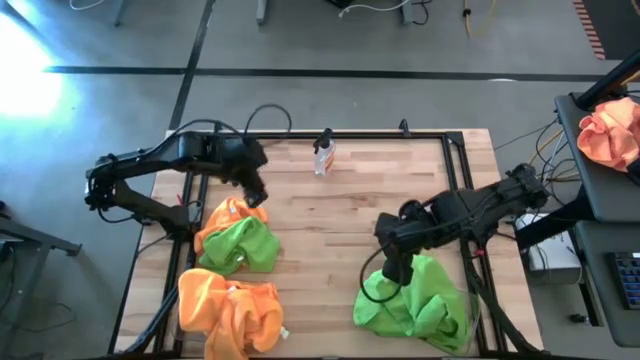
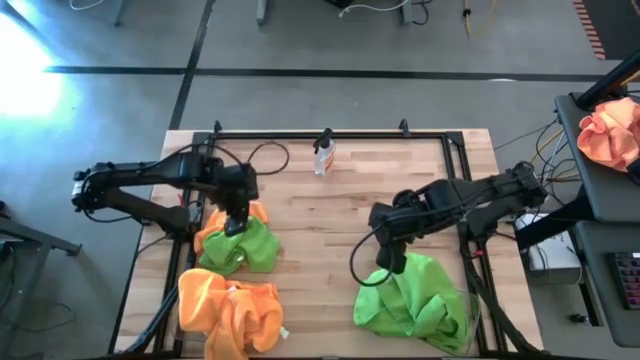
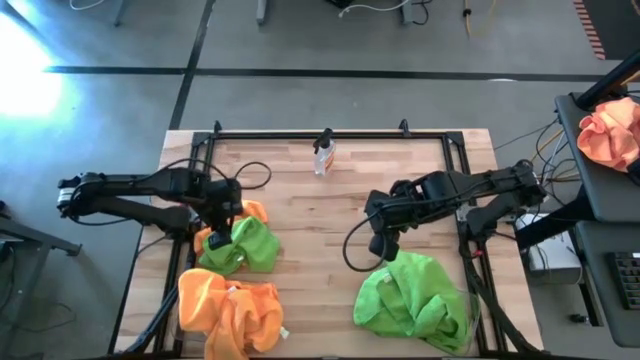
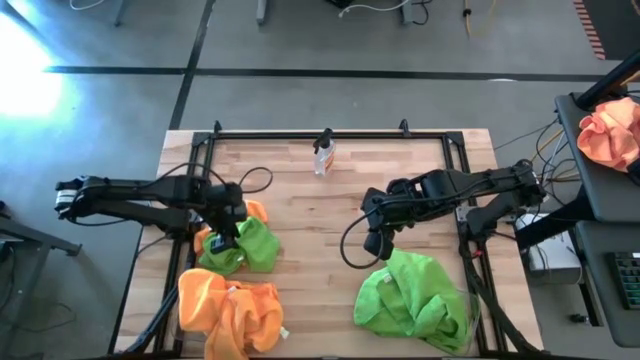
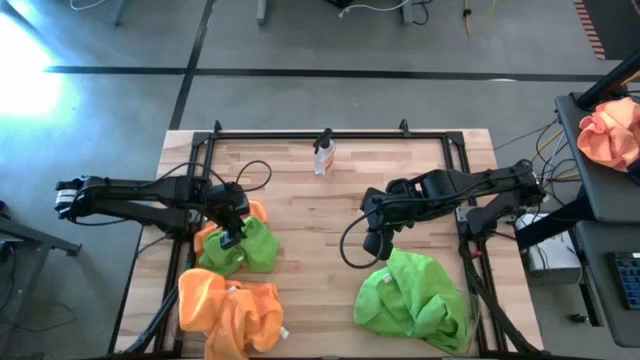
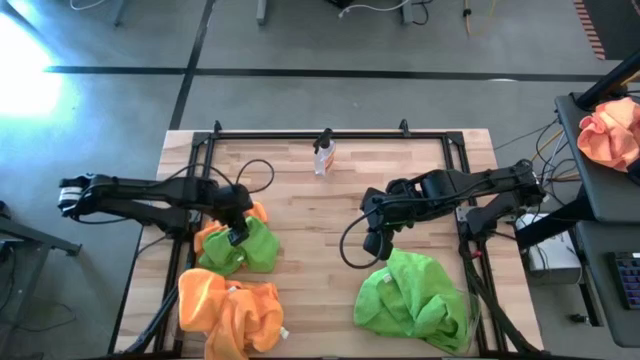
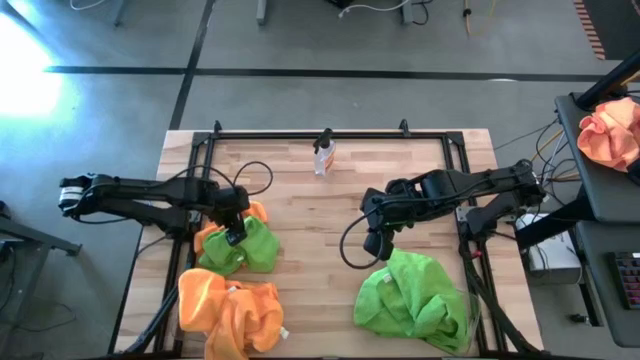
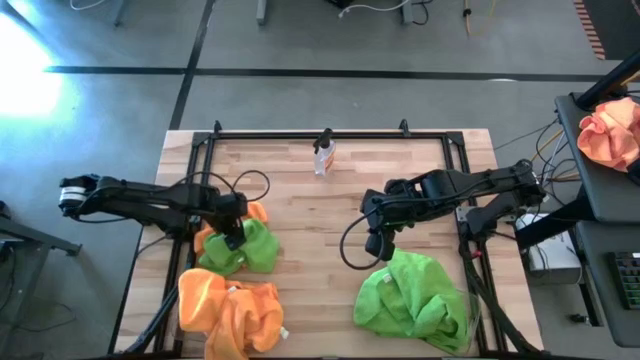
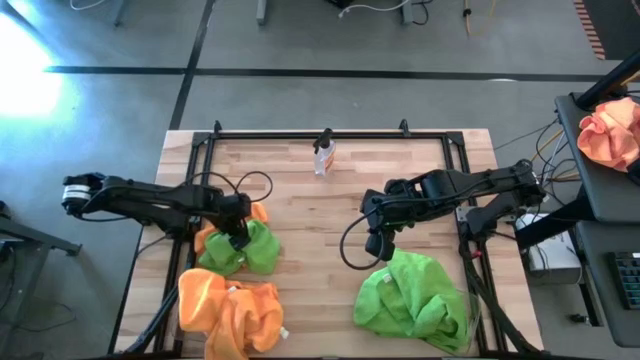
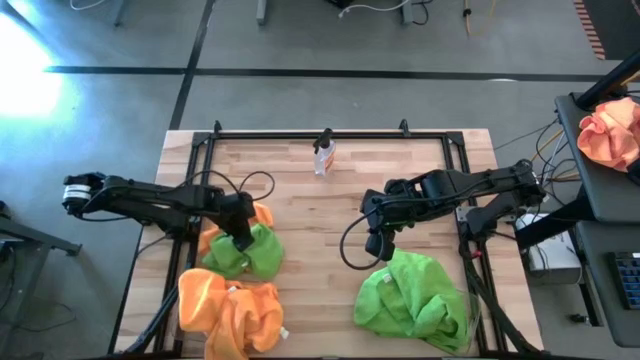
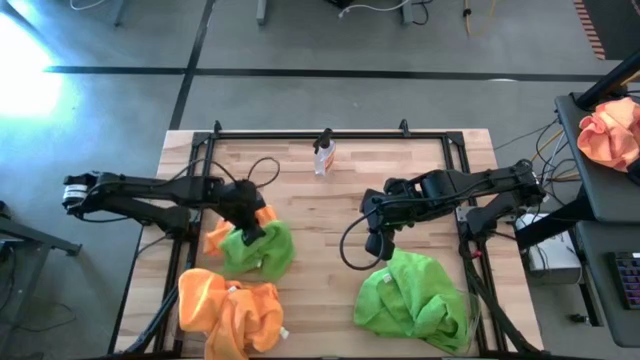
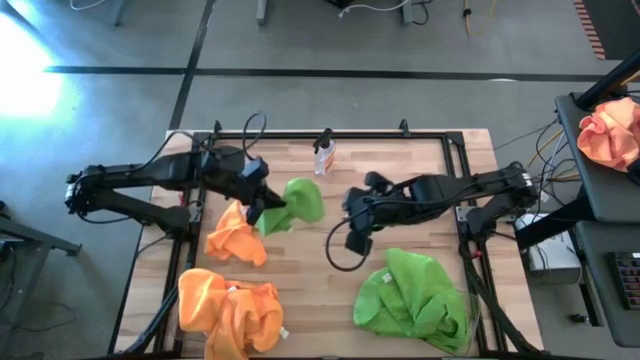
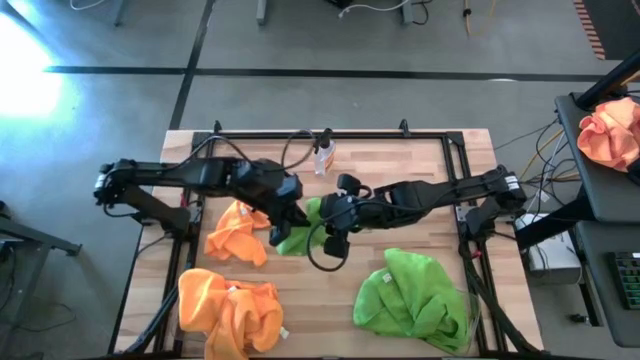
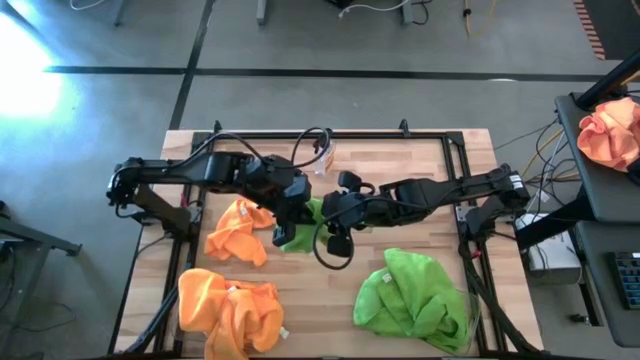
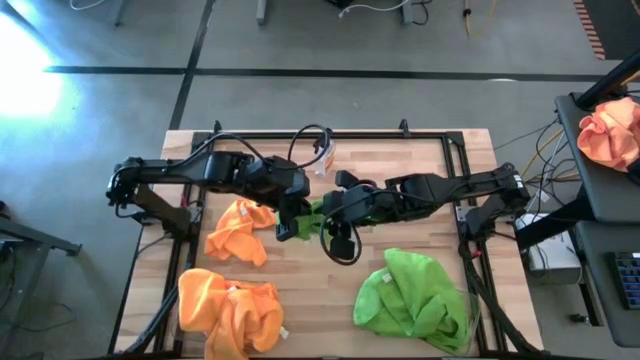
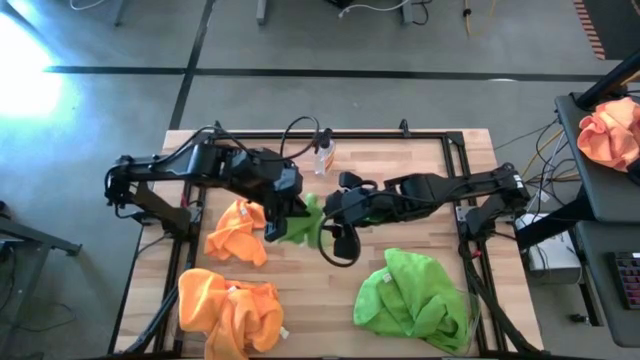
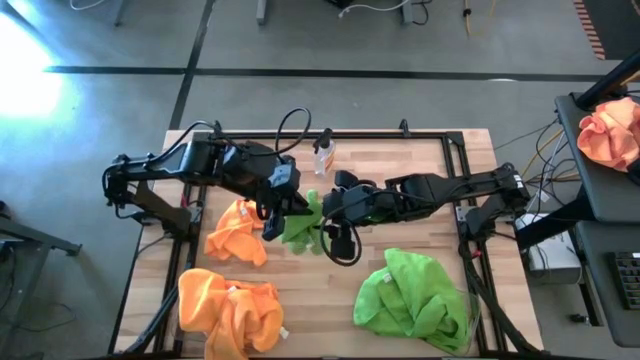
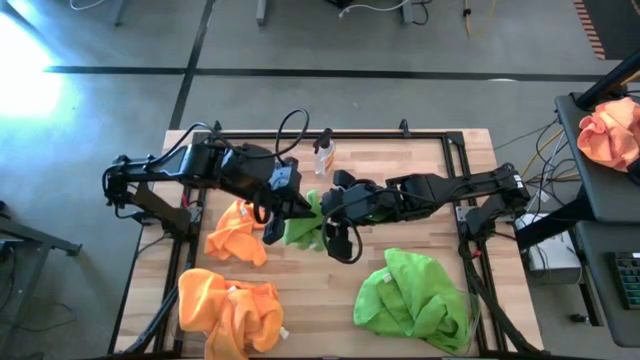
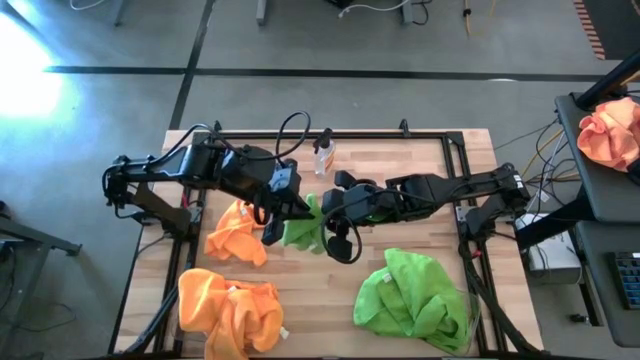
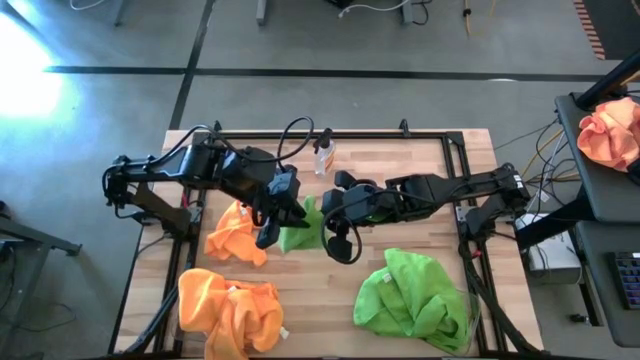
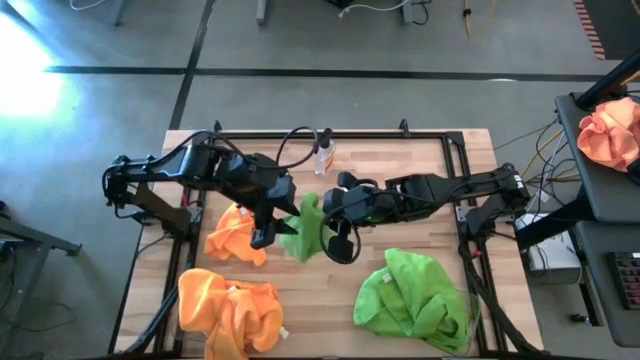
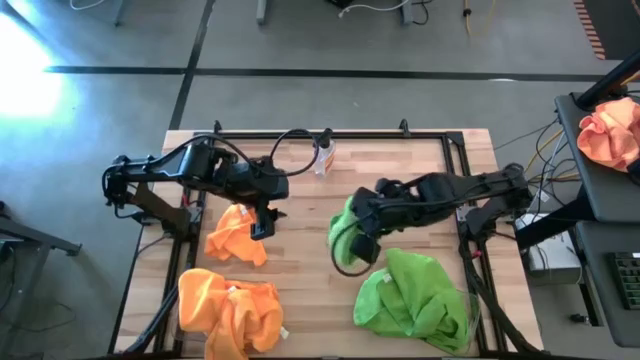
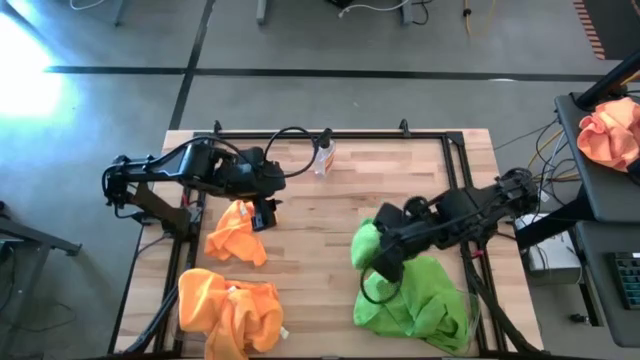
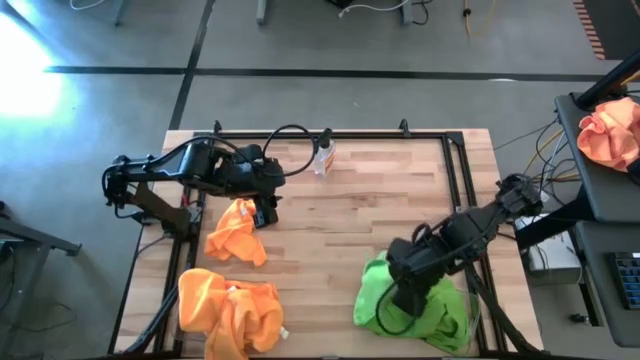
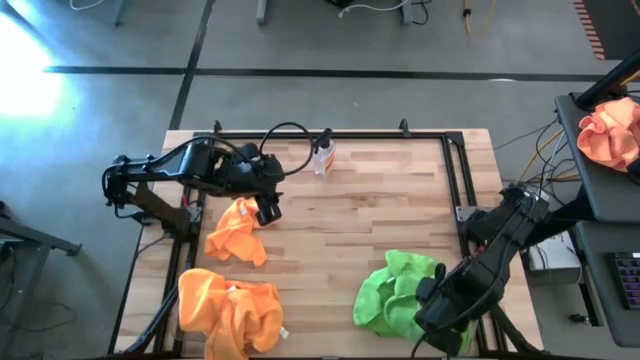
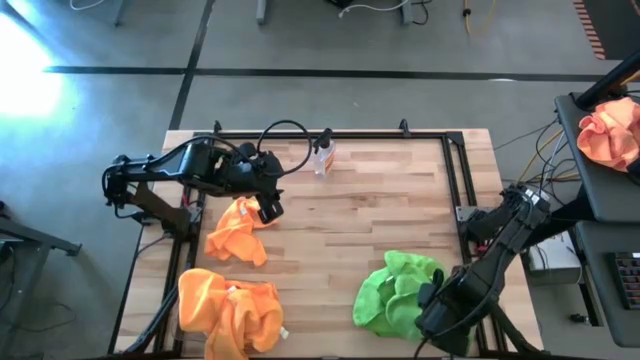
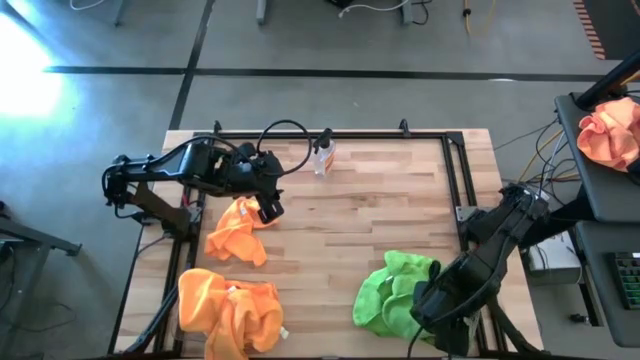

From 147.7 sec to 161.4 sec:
Task: Sort microfiber towel by color & place in baskets
Put the green microfiber cloth into the right transparent bin

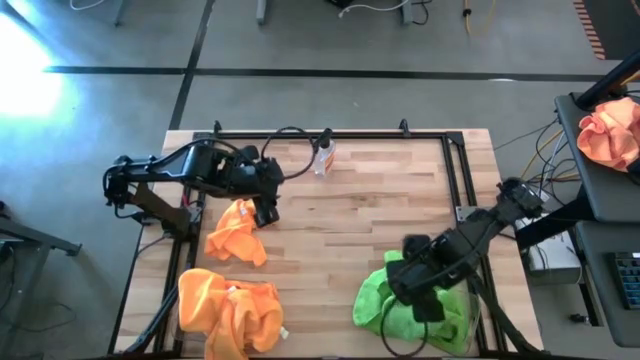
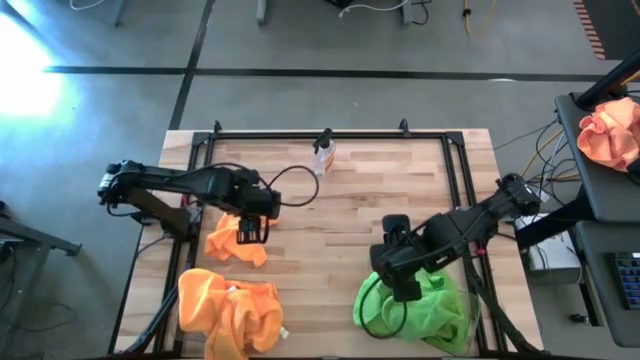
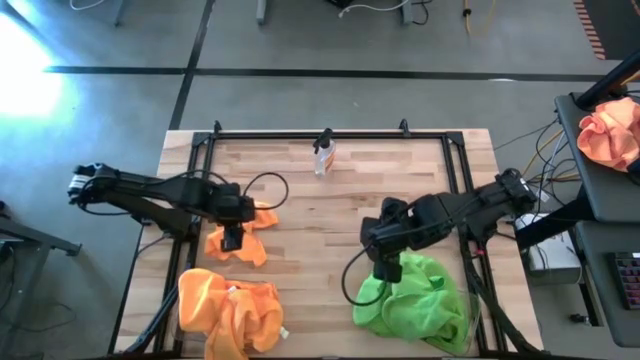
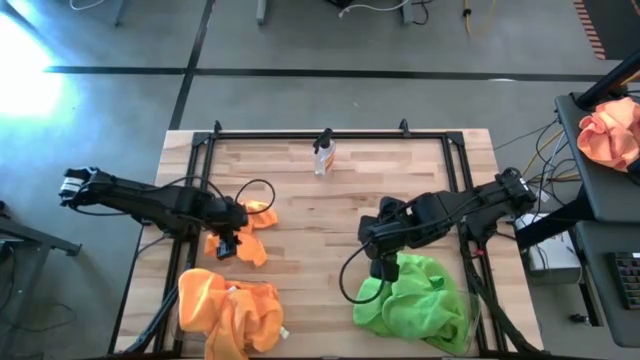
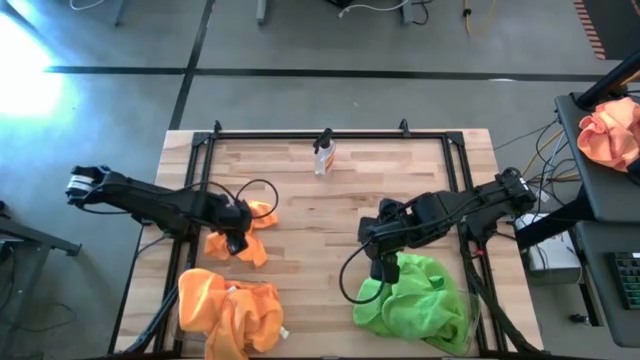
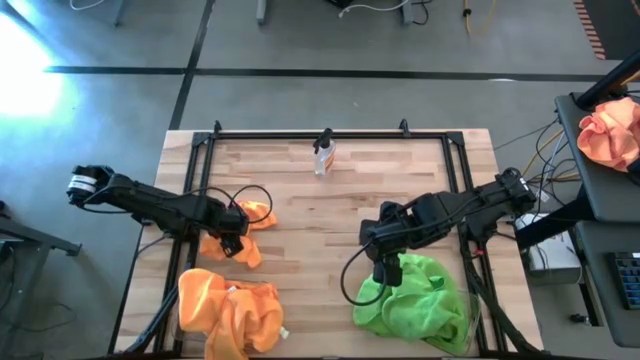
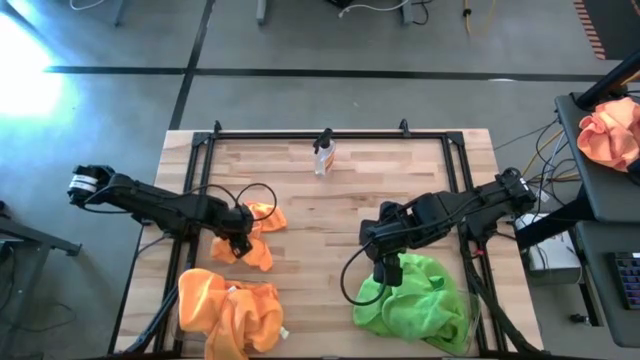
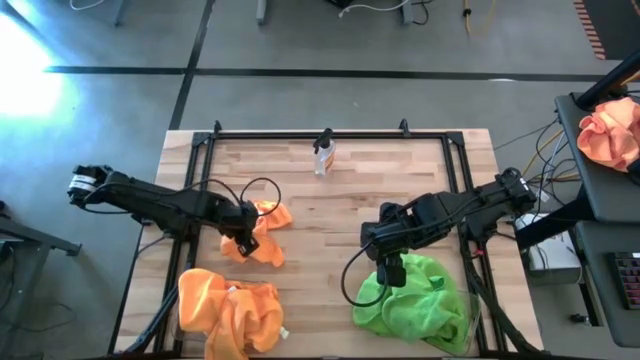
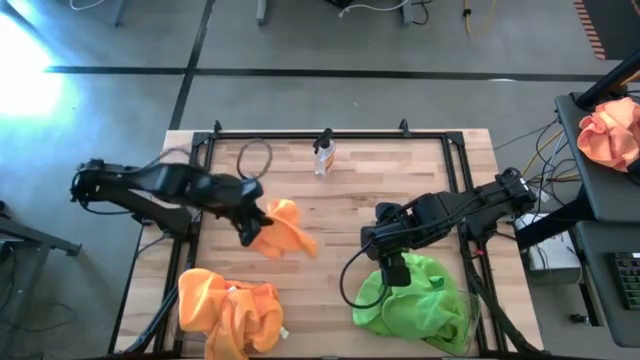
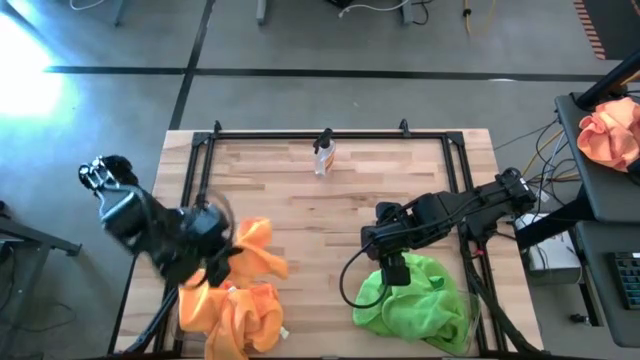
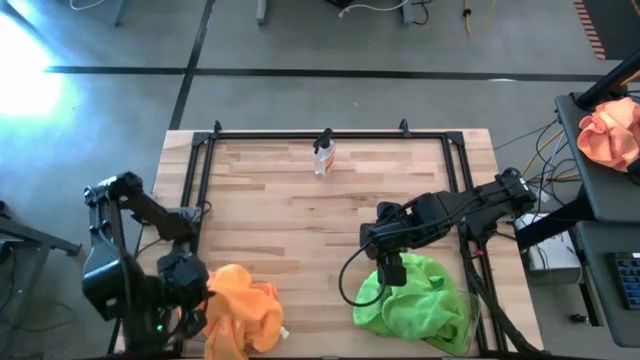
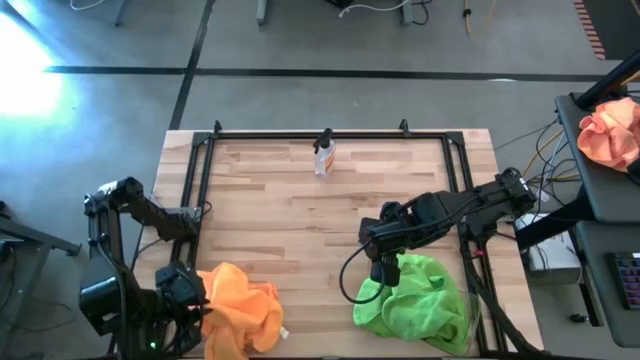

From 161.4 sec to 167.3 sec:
Put the orange microfiber cloth into the left transparent bin

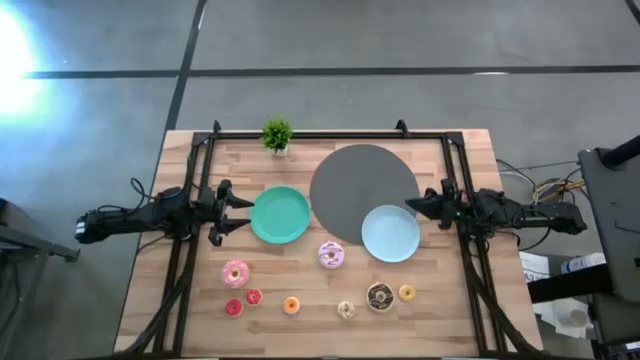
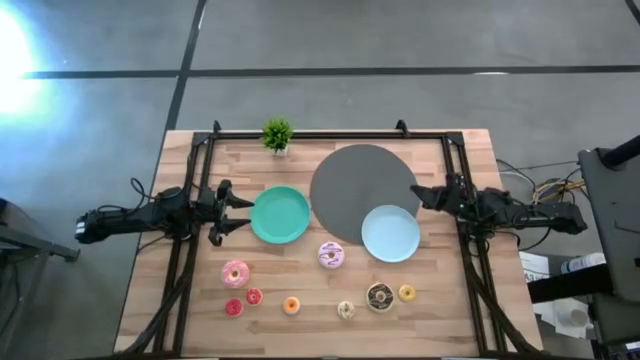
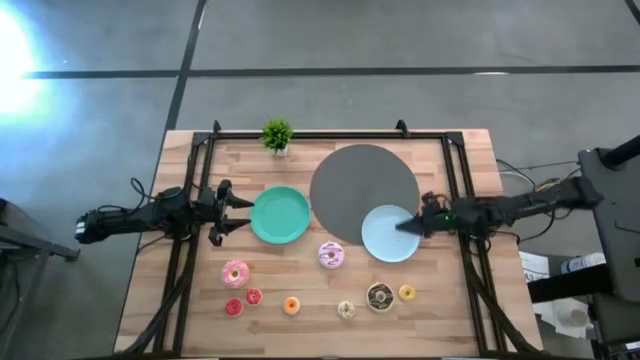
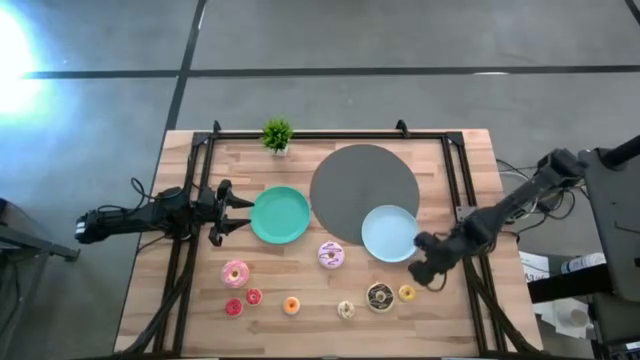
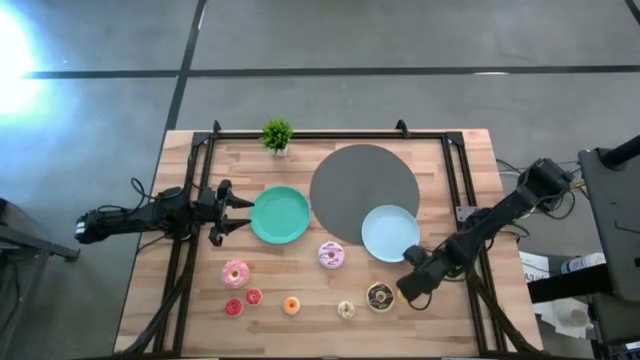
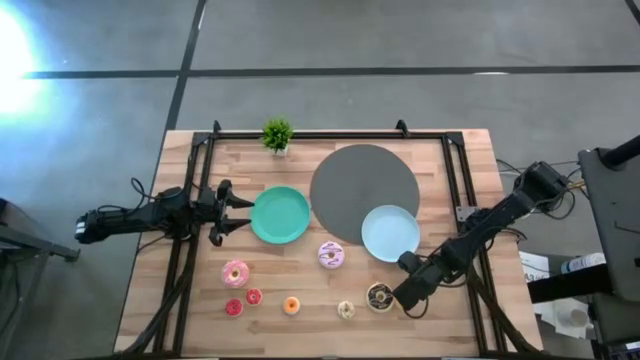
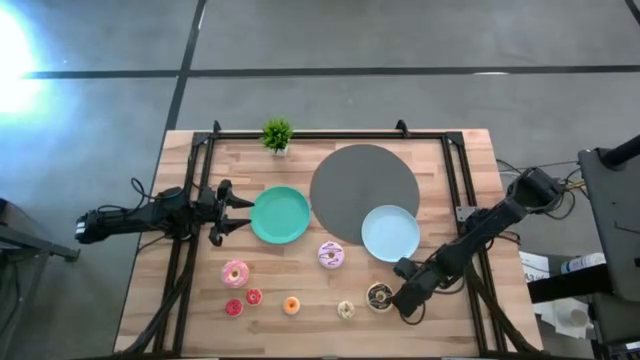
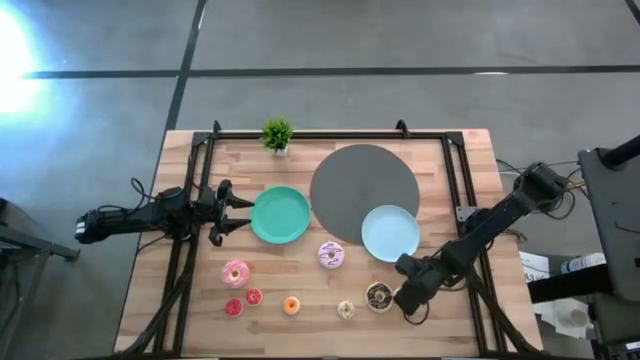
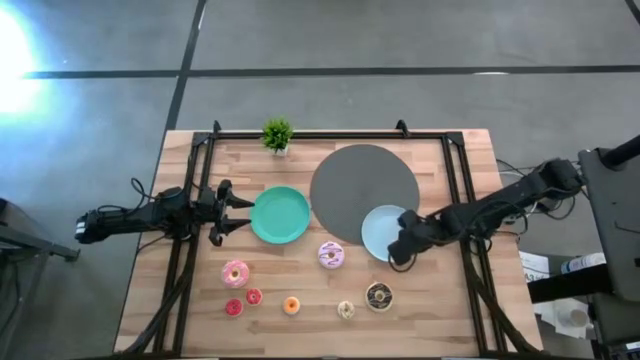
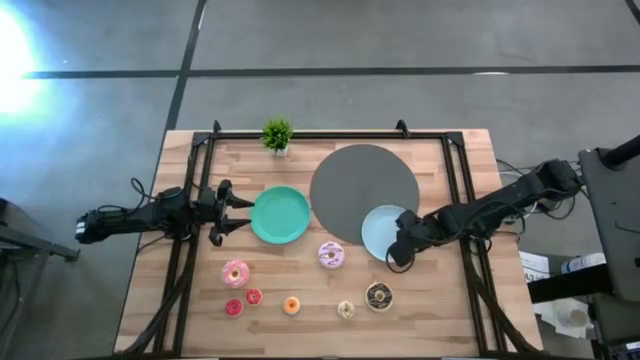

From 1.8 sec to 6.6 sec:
Task: Pick & Place donuts
Put the small yellow donut on the blue plate
